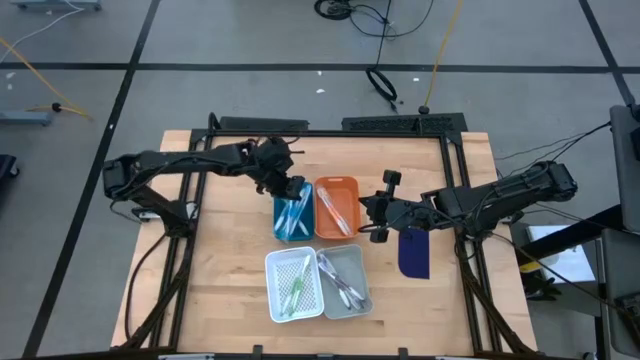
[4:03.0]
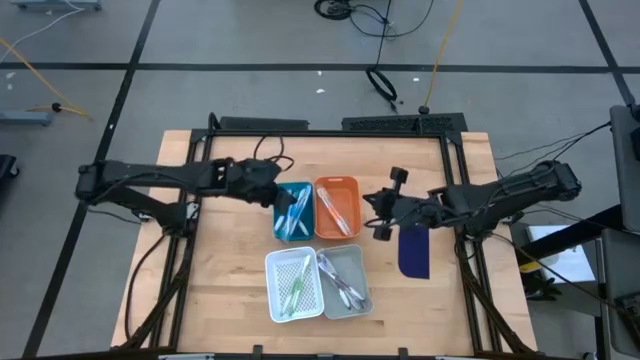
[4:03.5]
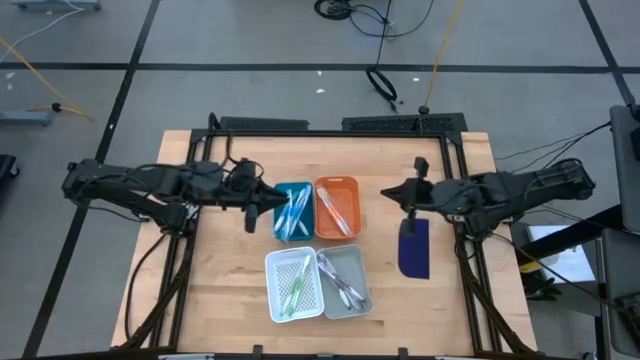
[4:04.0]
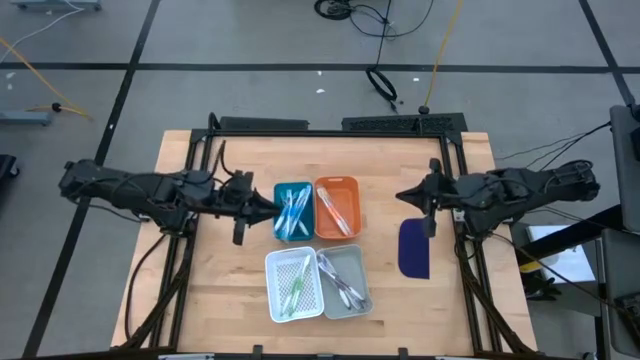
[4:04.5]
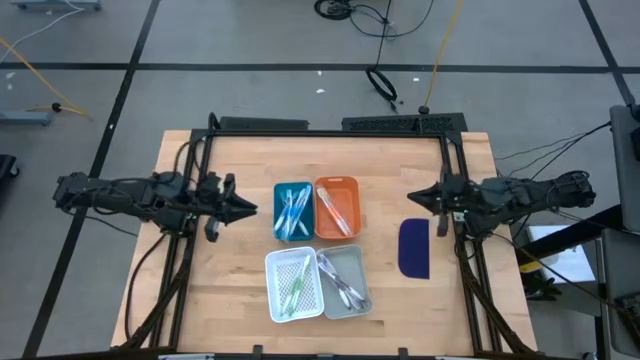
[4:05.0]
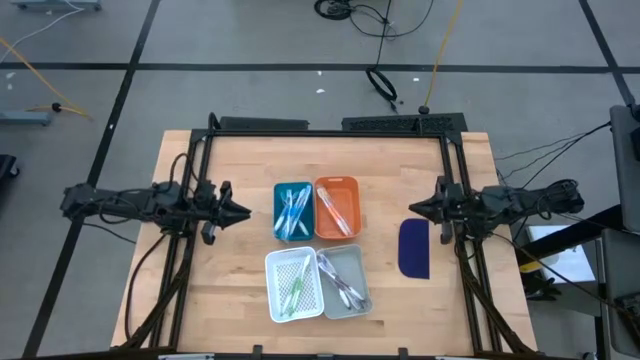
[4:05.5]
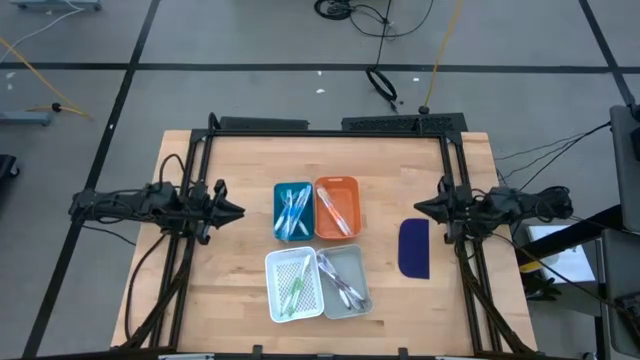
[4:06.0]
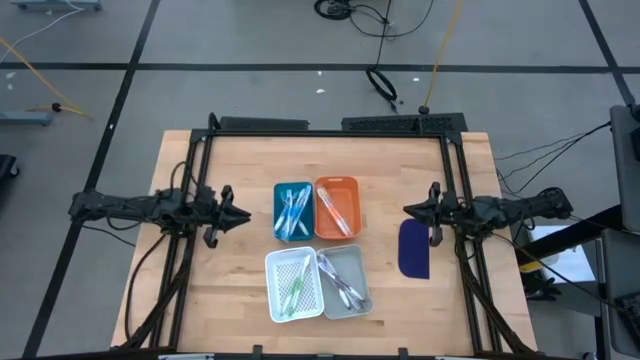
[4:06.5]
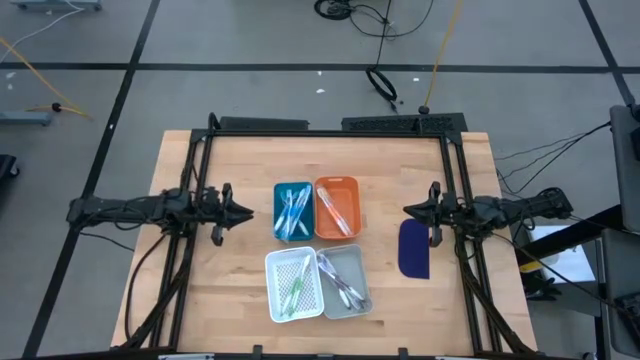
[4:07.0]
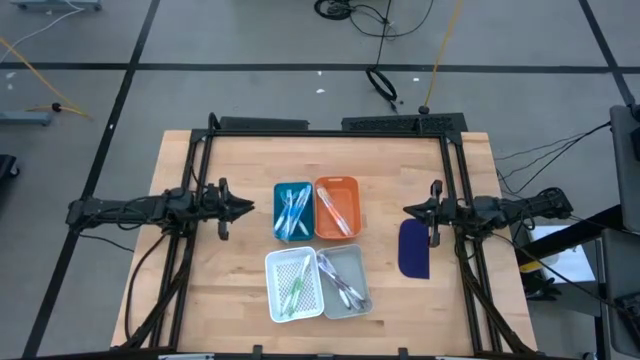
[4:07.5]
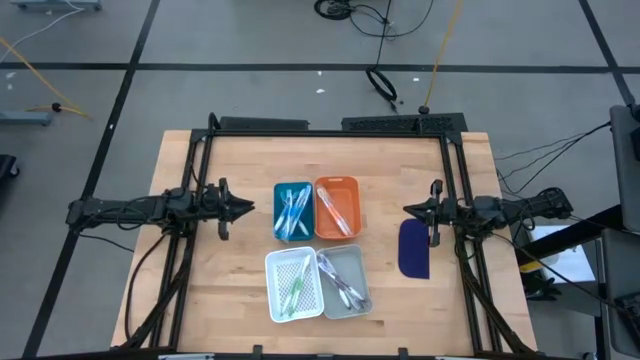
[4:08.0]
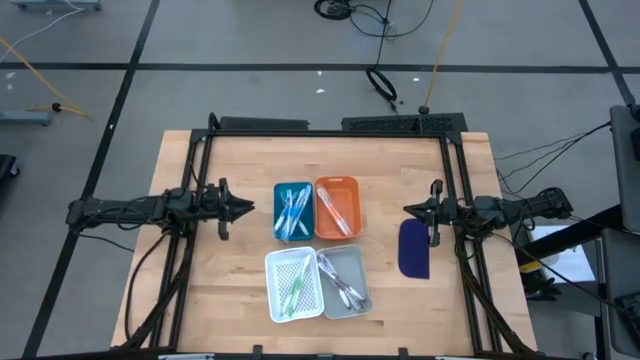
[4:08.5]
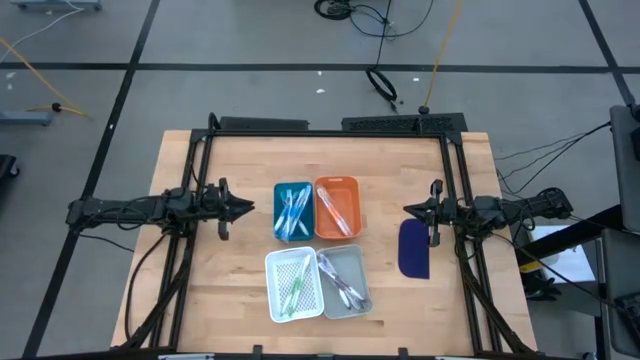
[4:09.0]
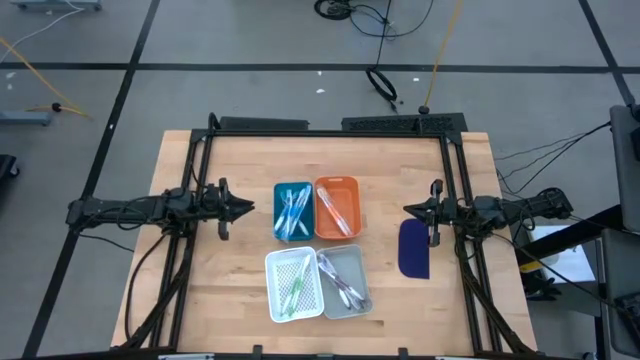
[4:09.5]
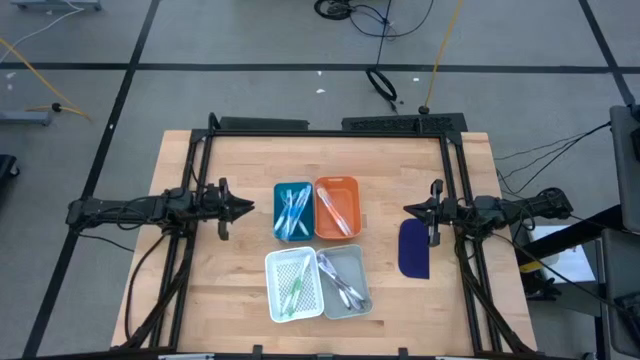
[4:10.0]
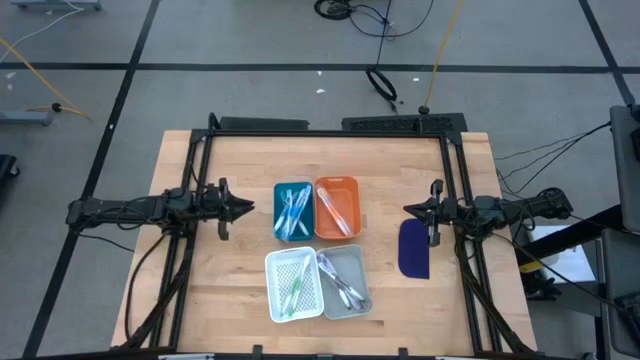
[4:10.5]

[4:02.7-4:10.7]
Task: Pick & Place Toothbrushes
Return to Home Position

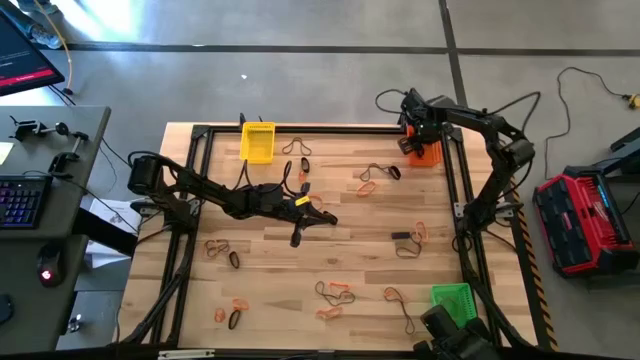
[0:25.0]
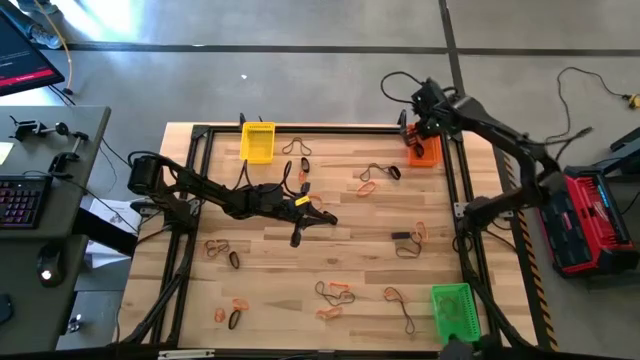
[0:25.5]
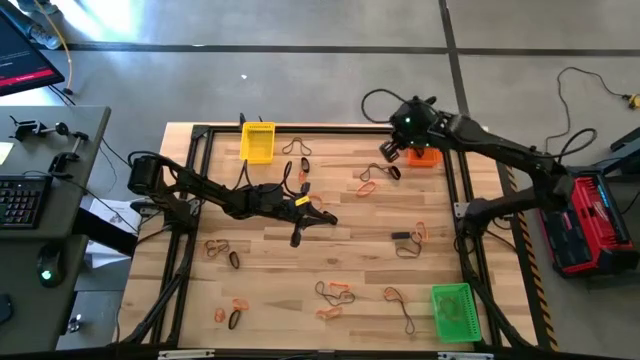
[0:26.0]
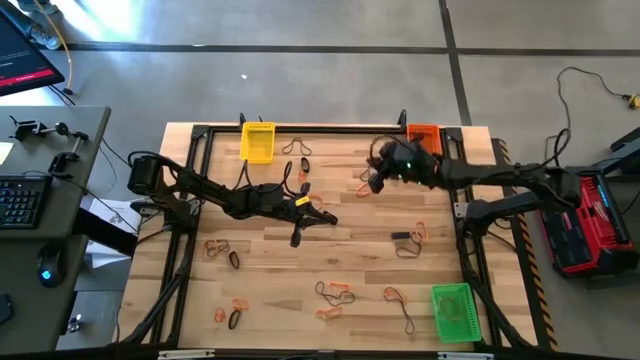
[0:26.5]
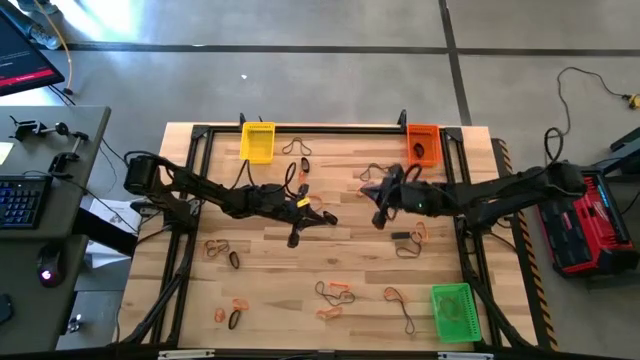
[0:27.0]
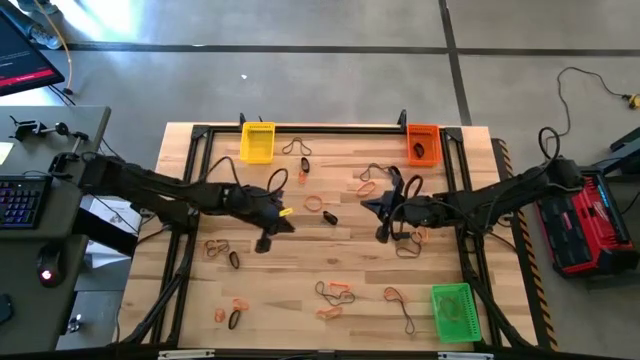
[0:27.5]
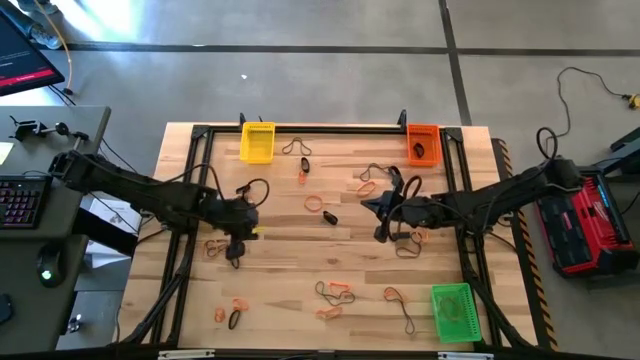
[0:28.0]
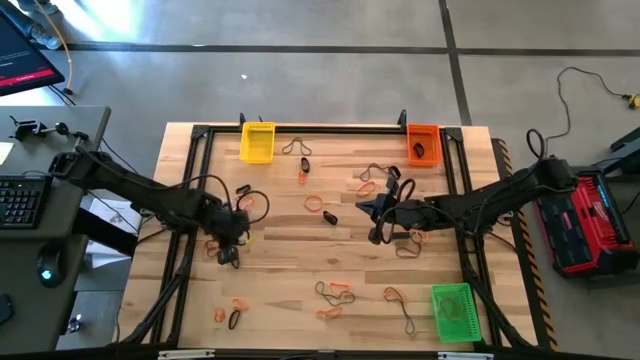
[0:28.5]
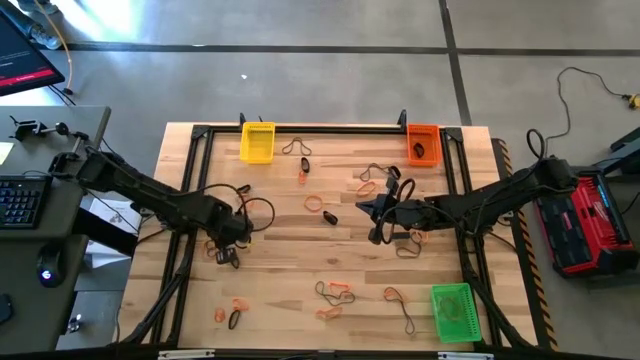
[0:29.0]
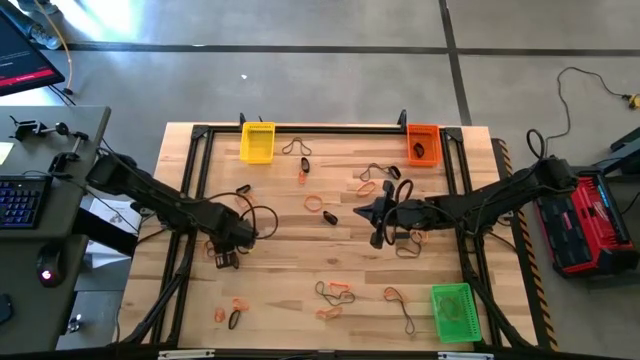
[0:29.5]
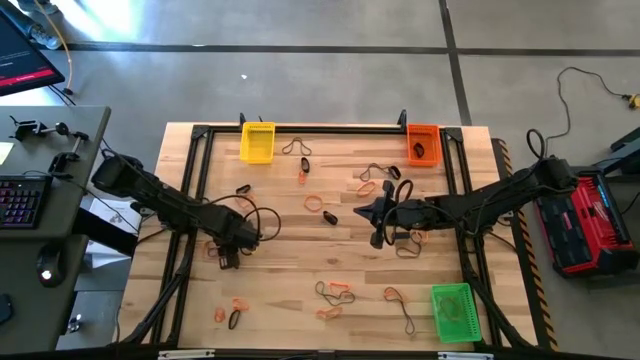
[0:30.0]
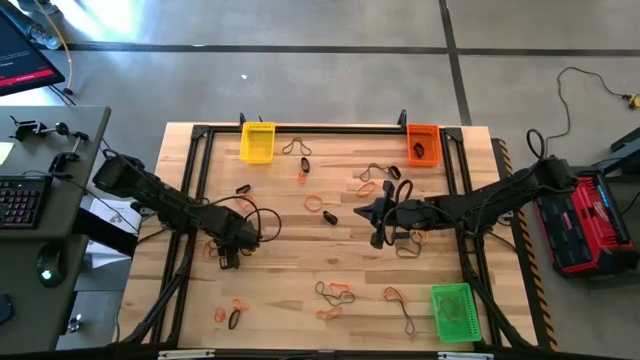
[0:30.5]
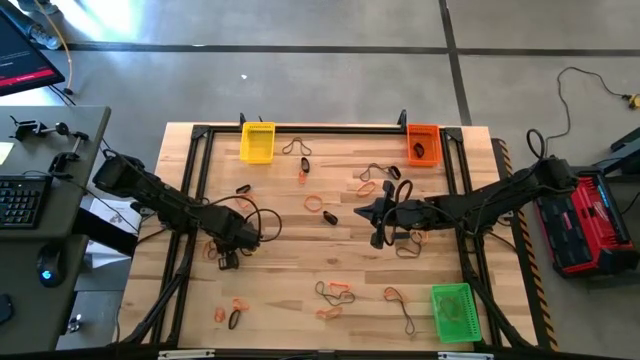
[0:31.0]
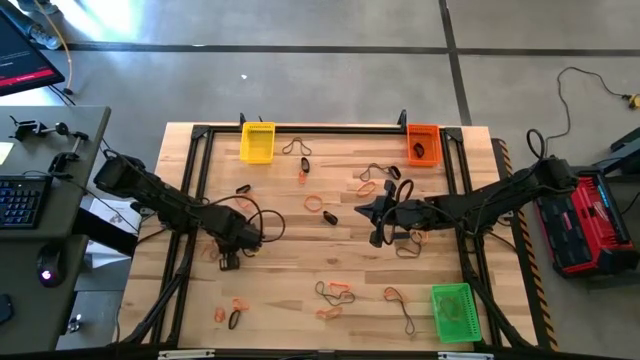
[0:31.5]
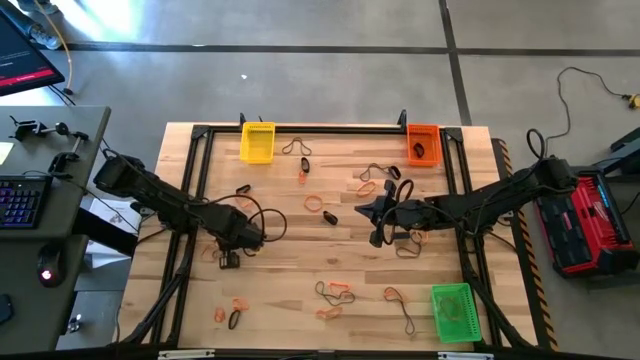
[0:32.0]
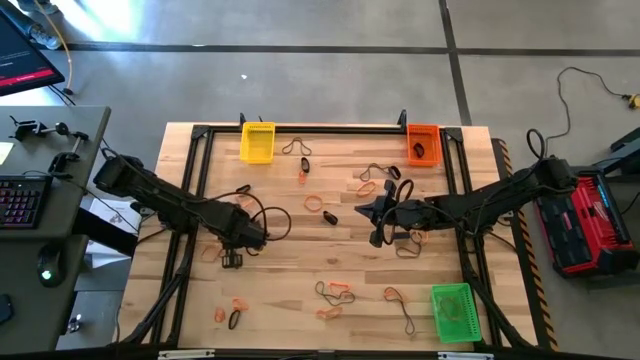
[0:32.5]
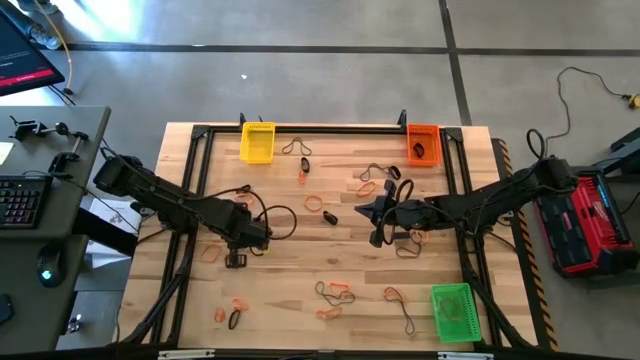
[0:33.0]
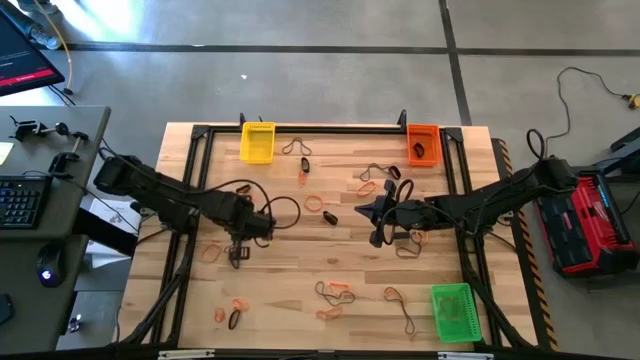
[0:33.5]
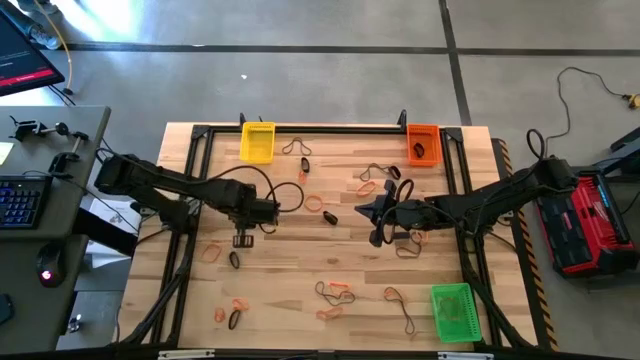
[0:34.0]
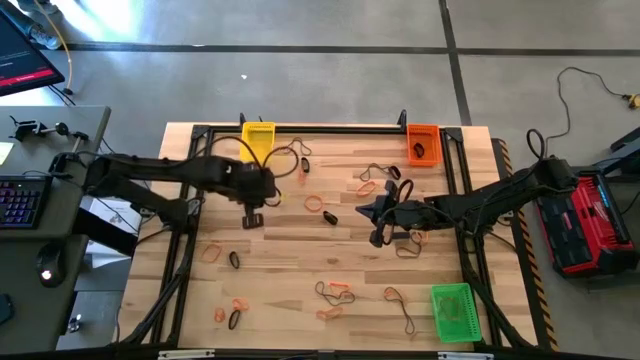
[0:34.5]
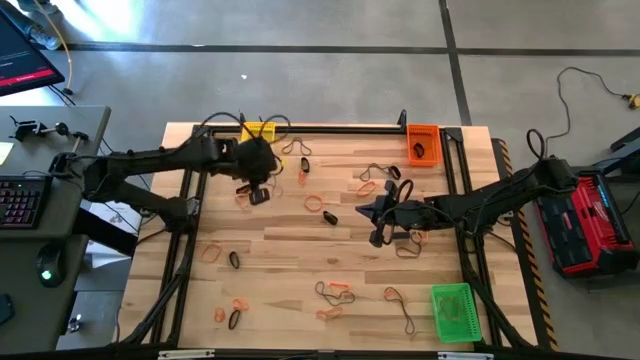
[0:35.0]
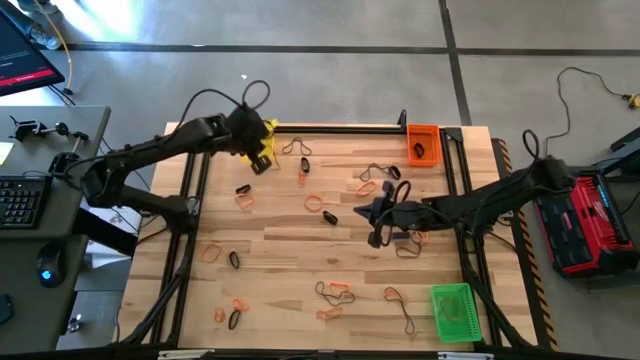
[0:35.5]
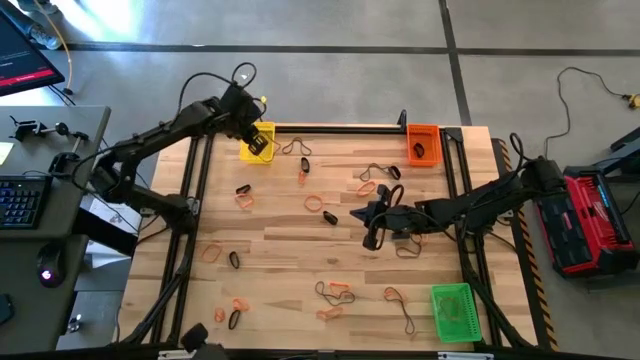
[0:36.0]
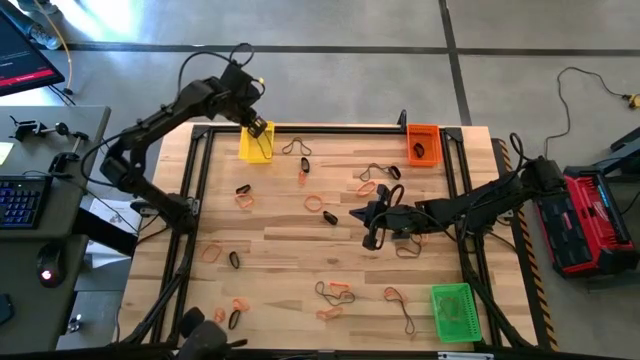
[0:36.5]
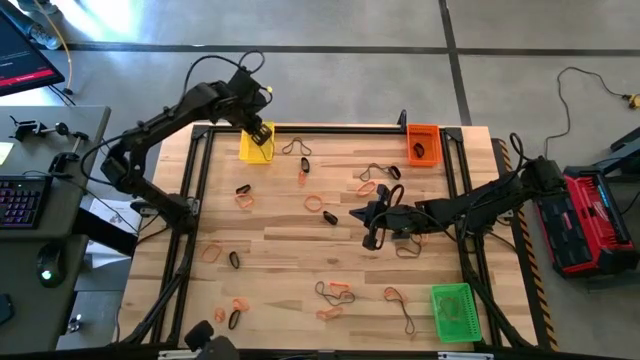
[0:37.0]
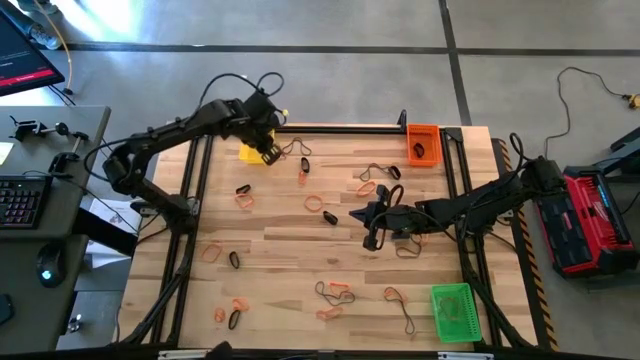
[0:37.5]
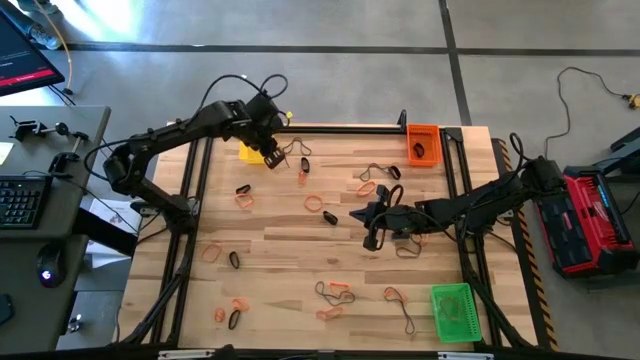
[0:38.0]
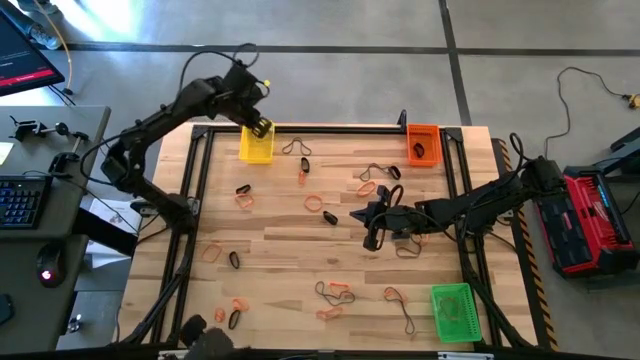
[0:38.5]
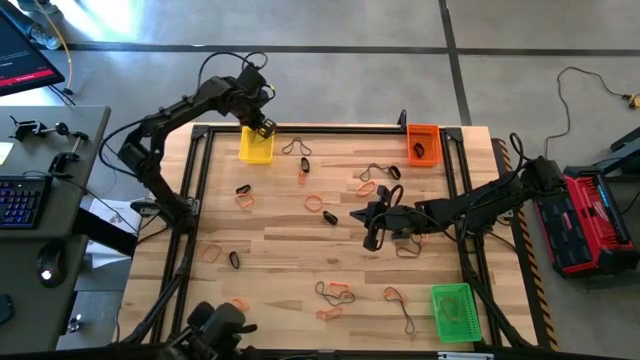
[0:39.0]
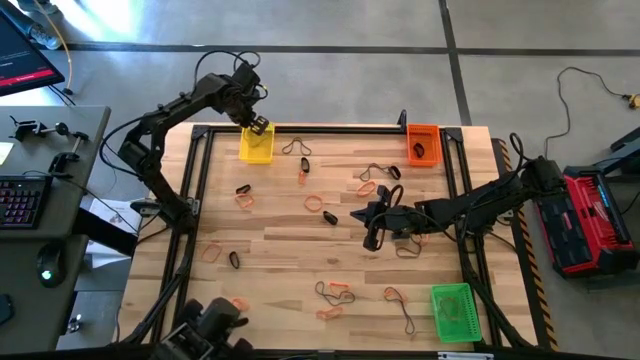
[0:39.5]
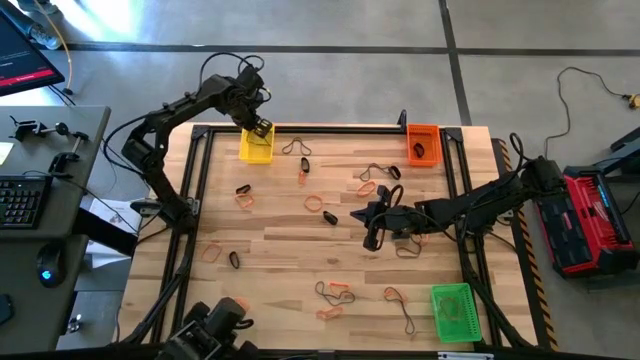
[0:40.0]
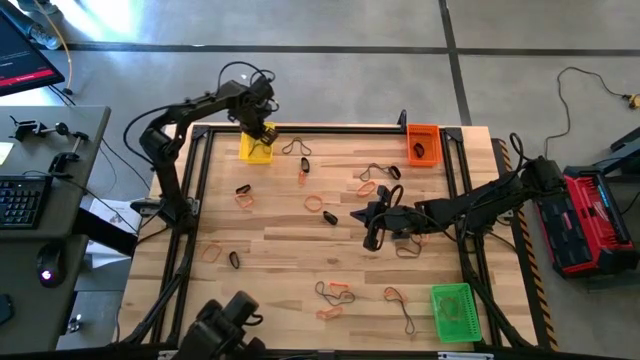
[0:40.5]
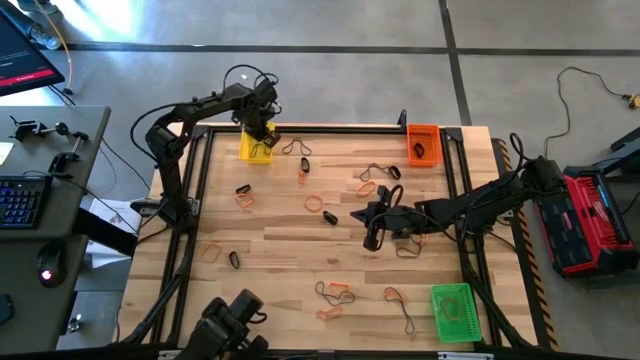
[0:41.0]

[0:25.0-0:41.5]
Task: Sort rubber bands into baskets
Put the purple rubber band into the yellow bin
